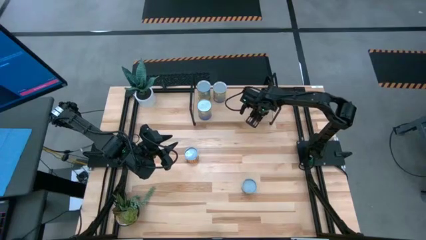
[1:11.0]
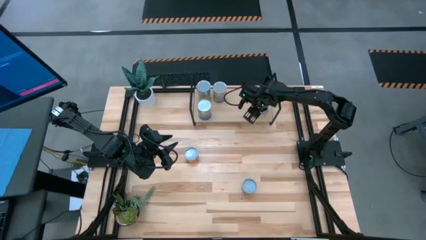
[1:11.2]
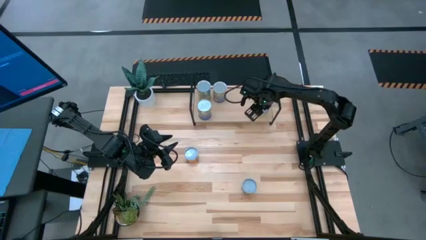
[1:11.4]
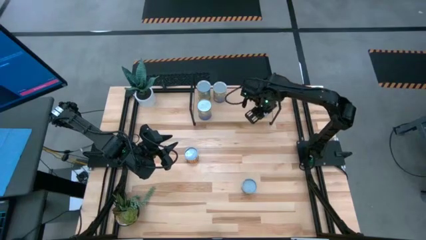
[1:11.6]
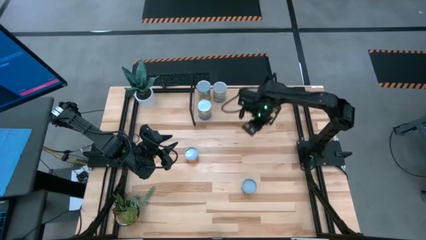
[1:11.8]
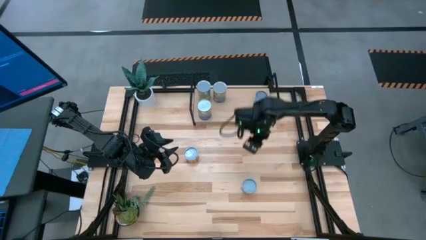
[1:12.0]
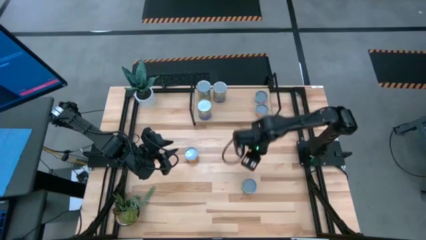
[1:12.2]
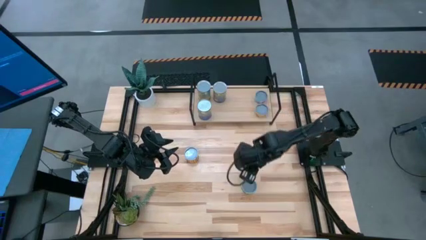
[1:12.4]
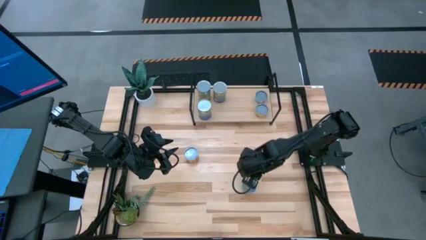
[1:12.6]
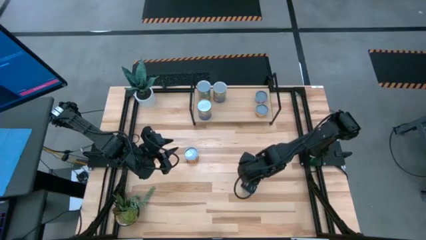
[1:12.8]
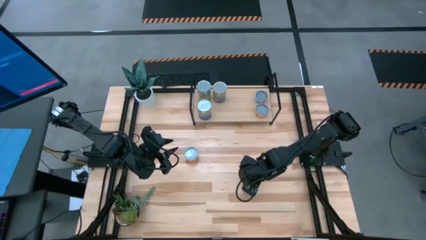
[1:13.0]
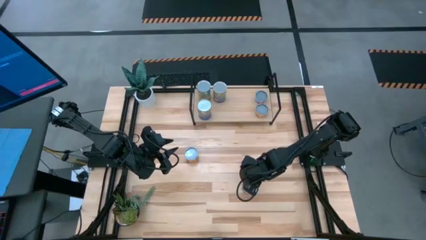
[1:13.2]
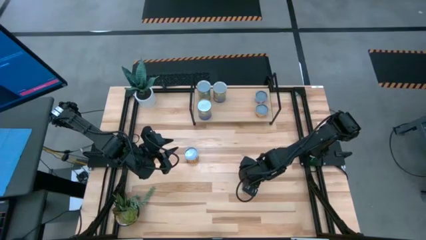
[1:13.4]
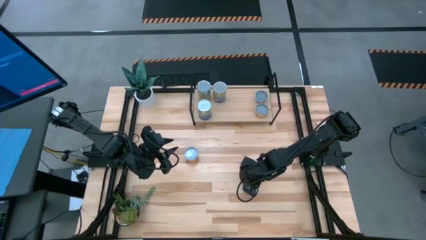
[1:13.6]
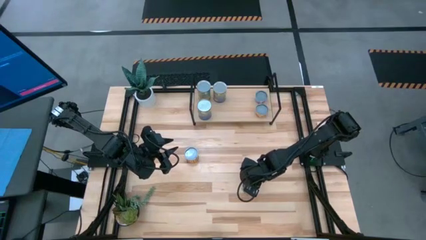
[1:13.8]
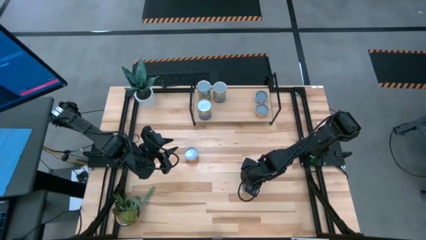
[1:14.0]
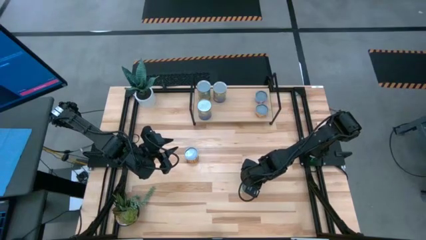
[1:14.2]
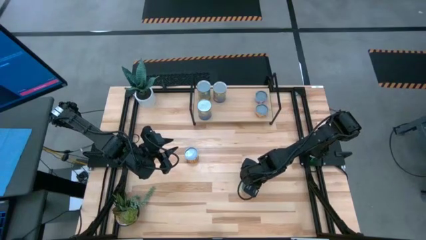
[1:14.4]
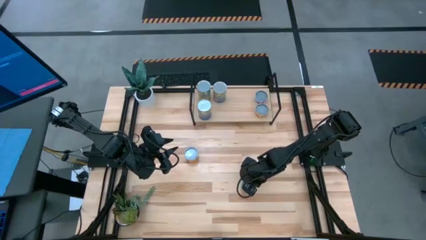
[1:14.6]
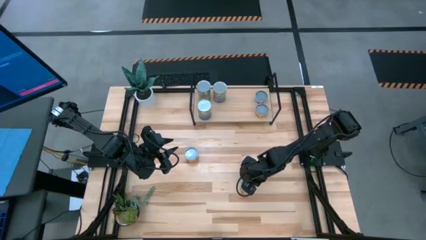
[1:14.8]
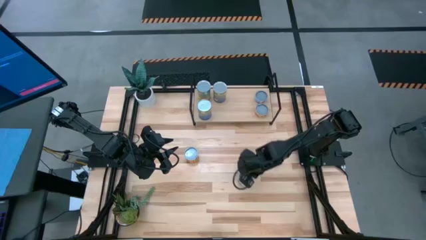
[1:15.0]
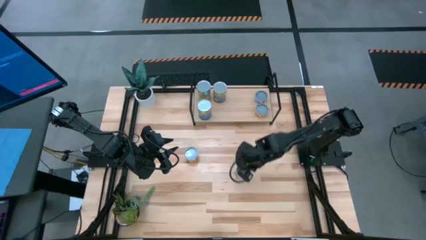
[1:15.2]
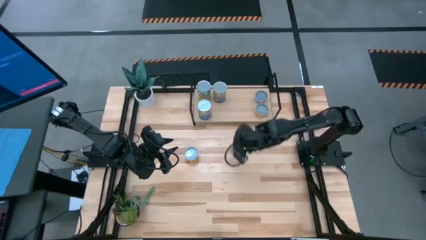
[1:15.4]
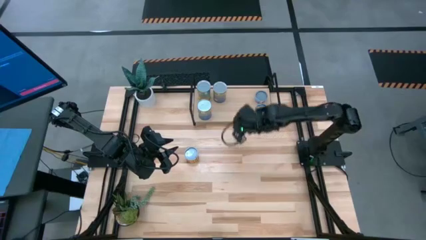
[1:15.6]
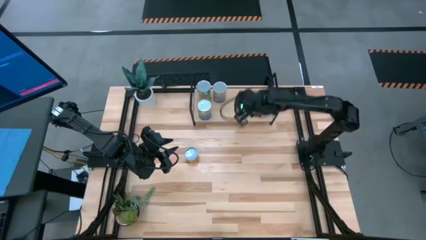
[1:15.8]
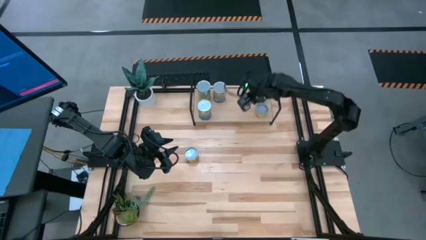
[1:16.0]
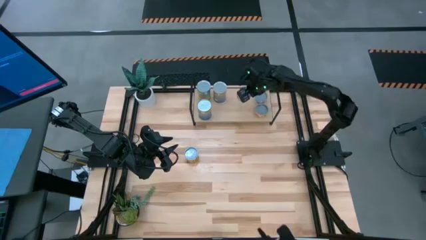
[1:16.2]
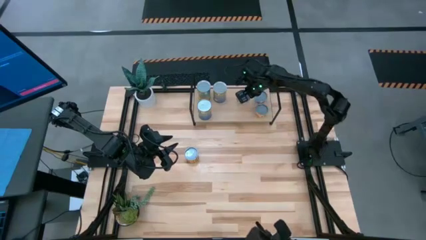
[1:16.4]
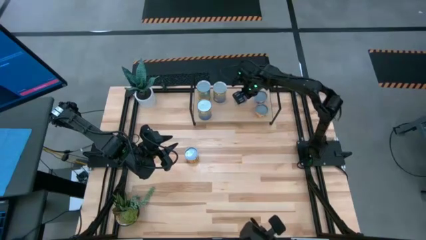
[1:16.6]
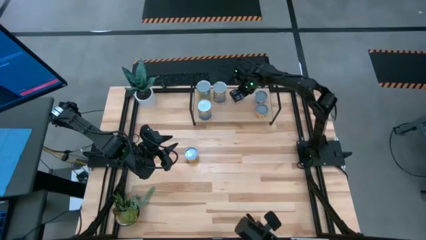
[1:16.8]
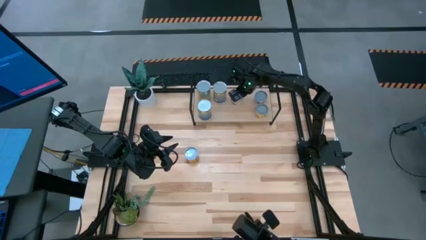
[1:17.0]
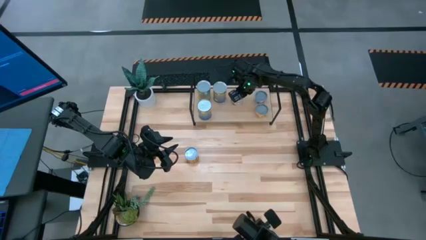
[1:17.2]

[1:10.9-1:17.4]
Task: Pick and place cans onto a shelf
Put the canned green peas on the shelf

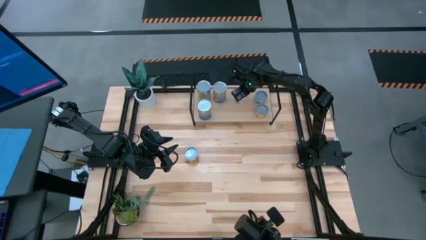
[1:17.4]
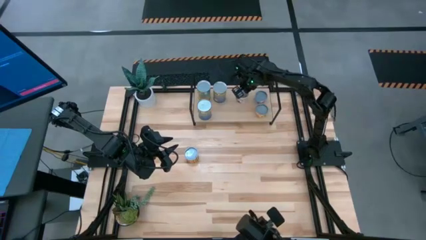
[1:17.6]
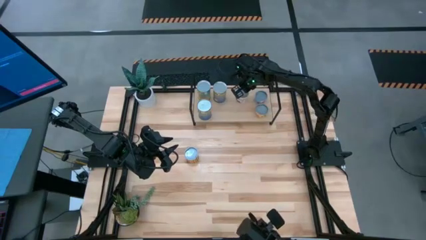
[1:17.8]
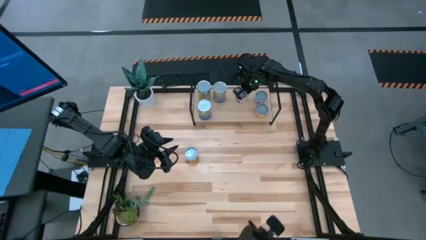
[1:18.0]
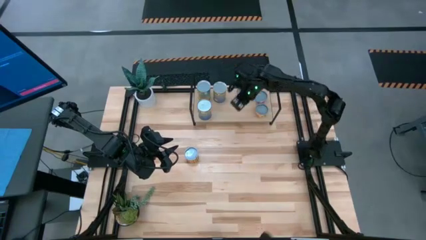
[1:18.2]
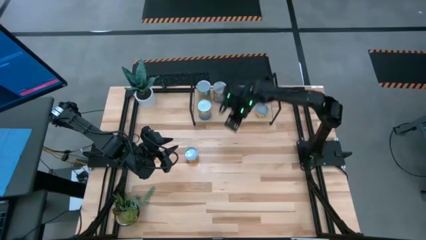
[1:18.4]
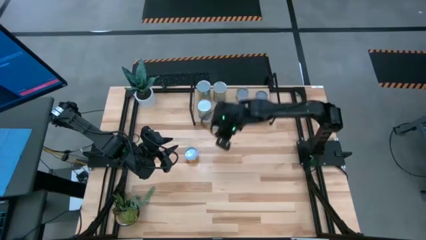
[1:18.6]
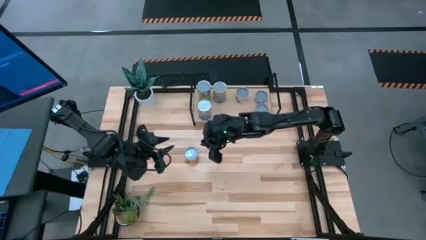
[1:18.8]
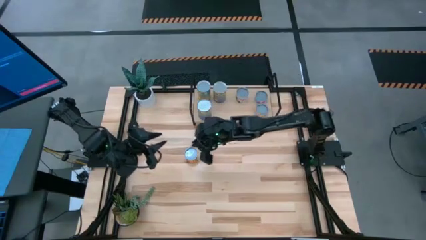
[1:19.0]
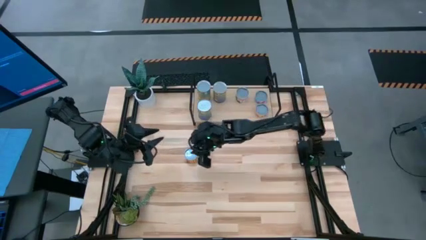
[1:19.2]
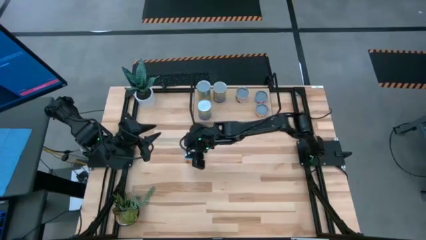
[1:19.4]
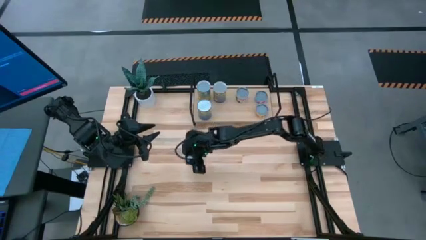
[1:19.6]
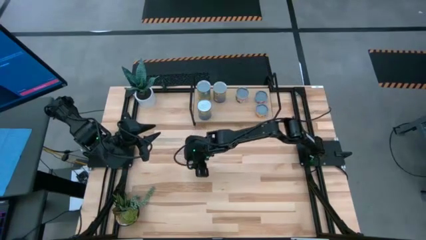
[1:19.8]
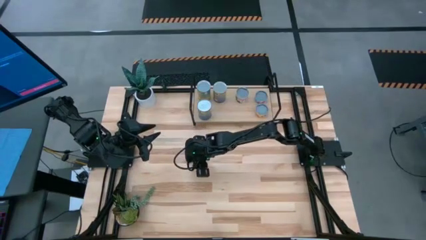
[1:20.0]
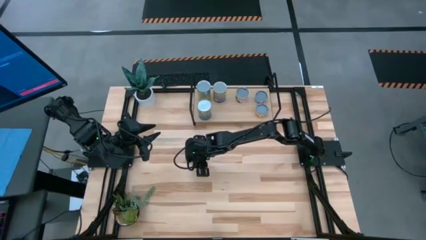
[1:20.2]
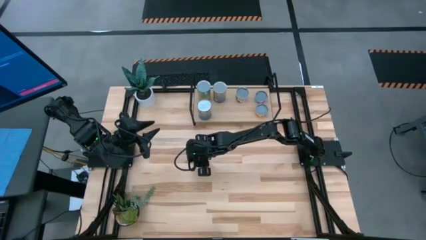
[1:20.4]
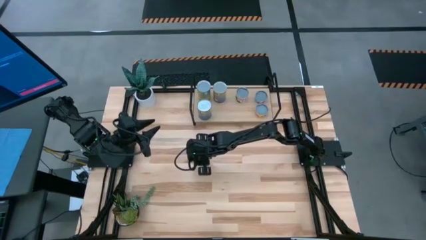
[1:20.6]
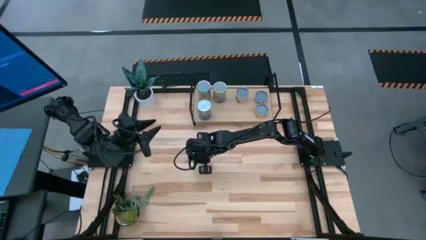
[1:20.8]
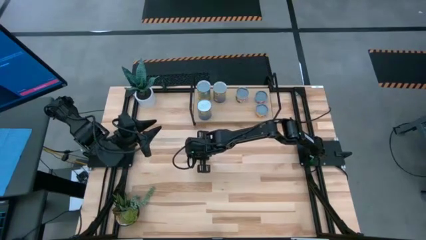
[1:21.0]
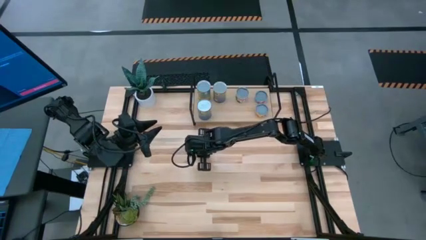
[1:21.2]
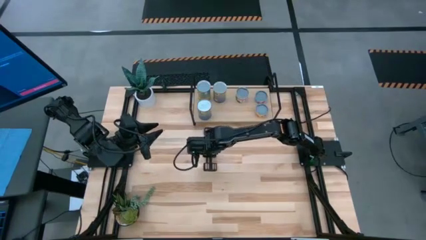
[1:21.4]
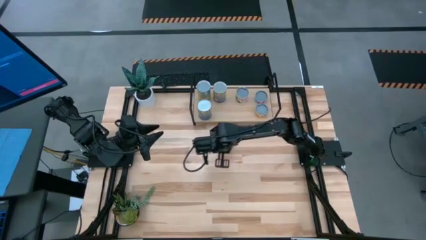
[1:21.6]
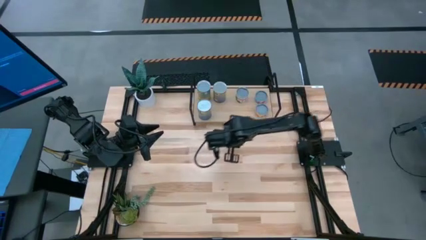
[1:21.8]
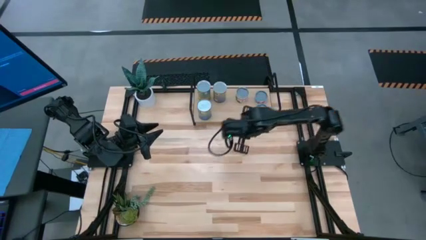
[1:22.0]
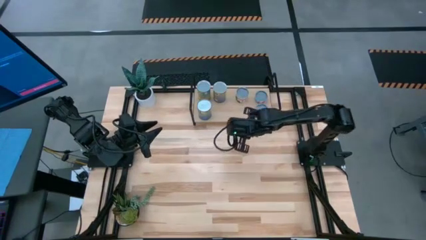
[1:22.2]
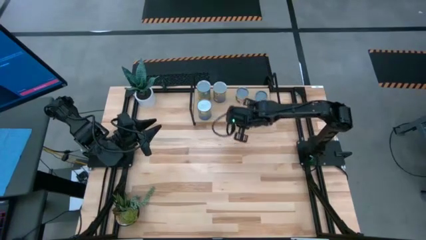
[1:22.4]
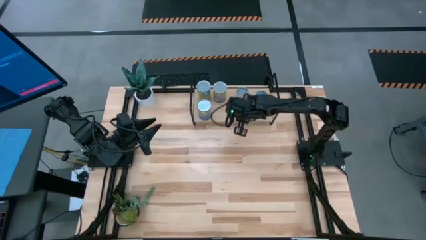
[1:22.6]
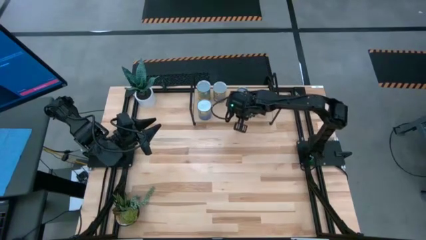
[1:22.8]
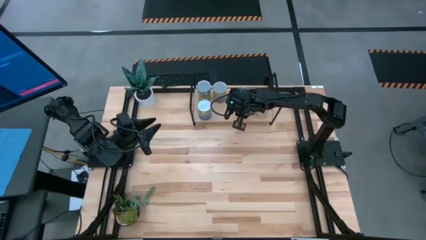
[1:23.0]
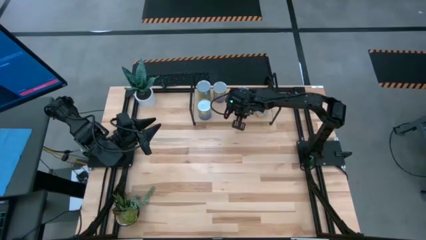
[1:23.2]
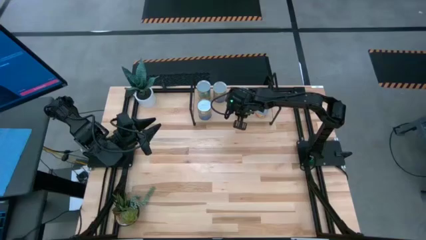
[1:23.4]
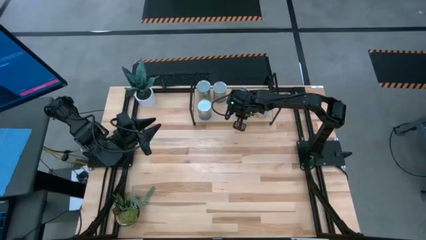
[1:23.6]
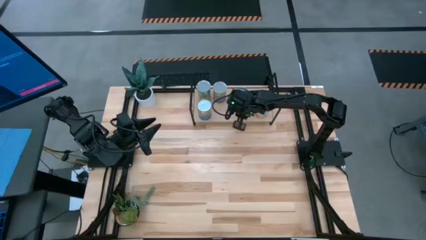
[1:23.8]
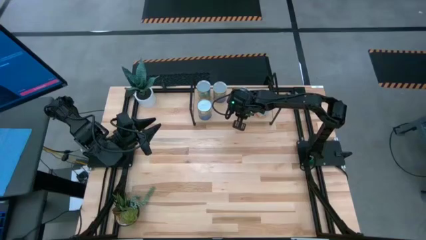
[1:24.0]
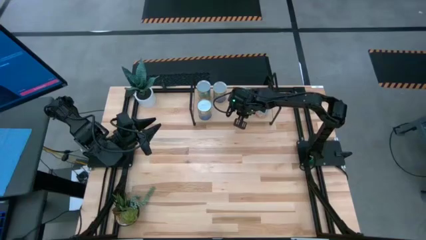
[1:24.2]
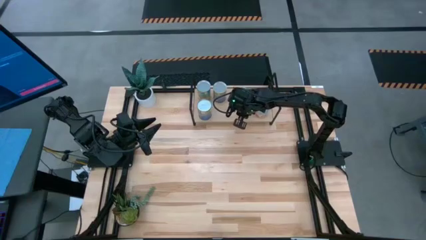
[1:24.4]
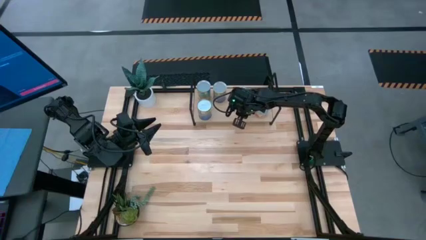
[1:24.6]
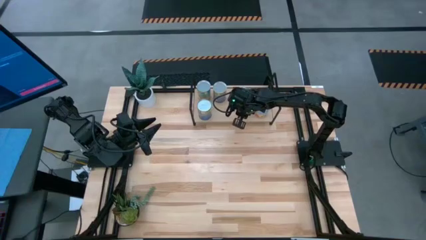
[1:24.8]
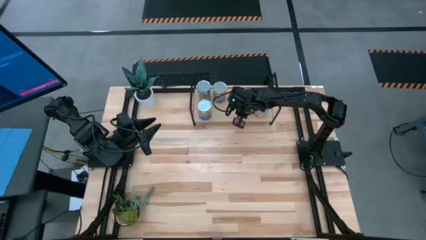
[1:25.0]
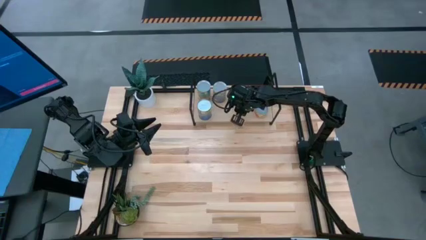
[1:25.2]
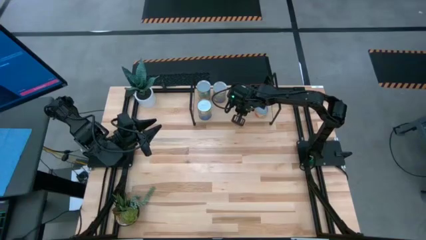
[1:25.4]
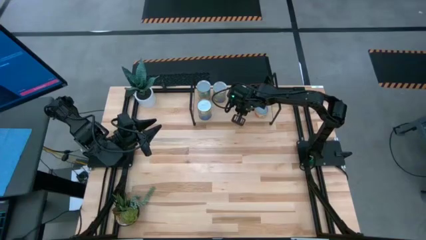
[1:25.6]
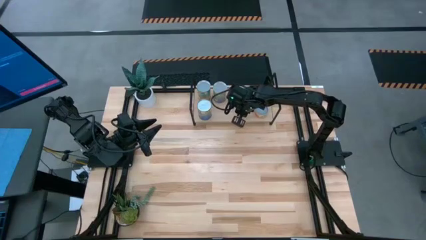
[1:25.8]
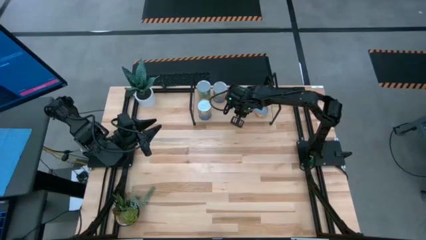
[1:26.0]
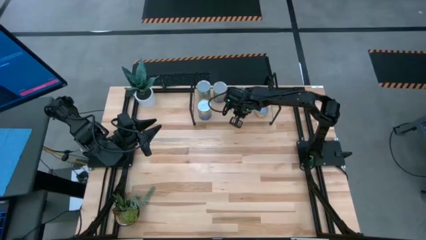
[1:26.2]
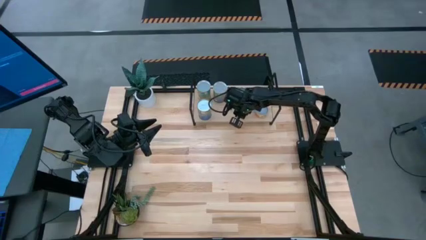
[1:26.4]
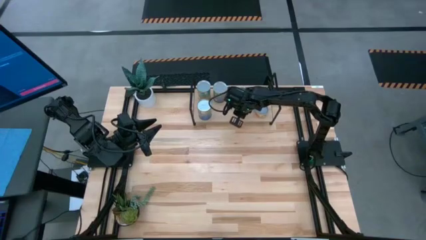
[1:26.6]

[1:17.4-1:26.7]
Put the canned black beans on the shelf

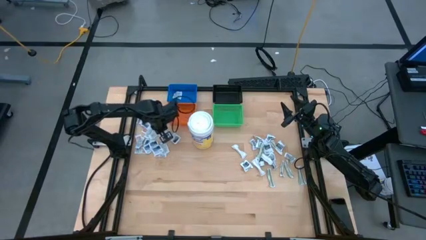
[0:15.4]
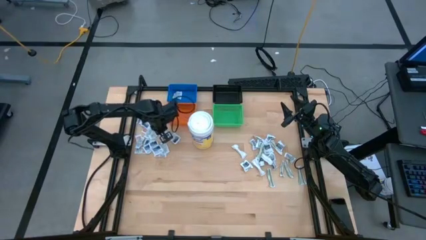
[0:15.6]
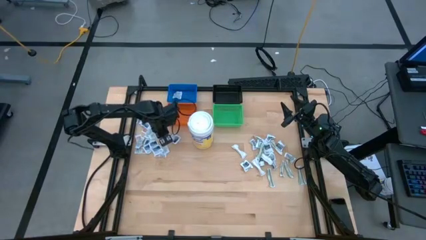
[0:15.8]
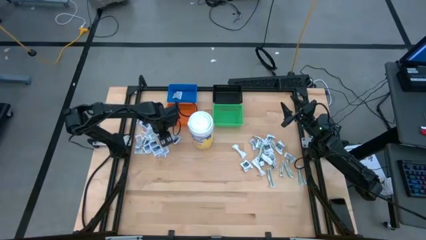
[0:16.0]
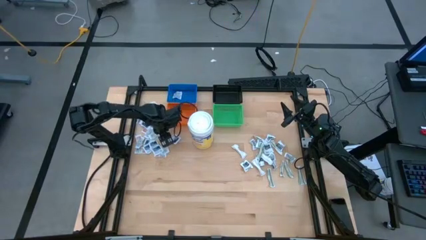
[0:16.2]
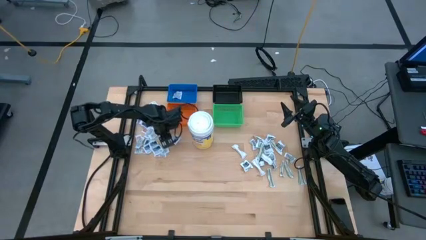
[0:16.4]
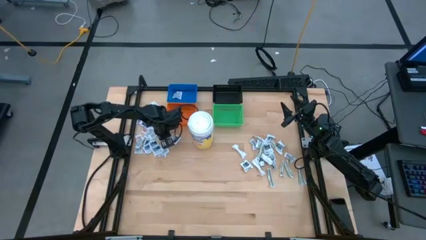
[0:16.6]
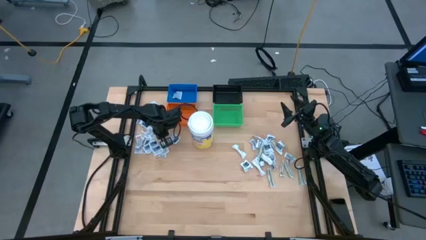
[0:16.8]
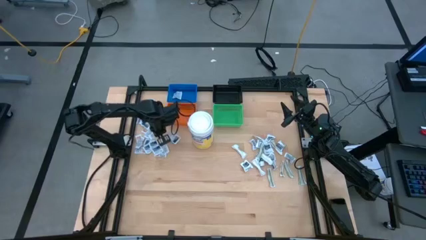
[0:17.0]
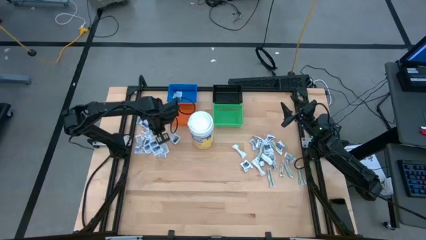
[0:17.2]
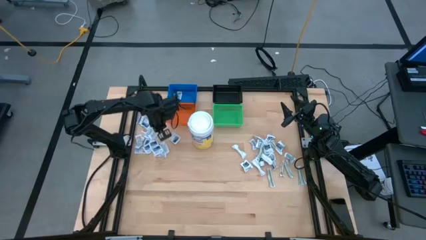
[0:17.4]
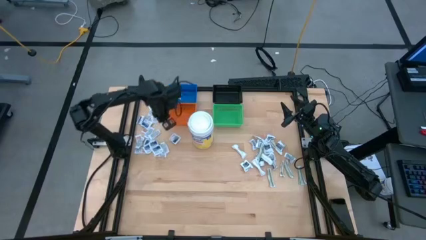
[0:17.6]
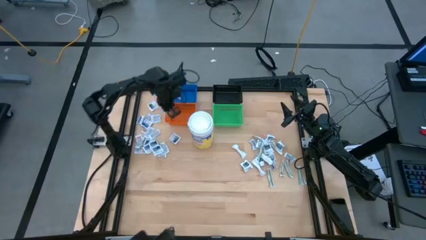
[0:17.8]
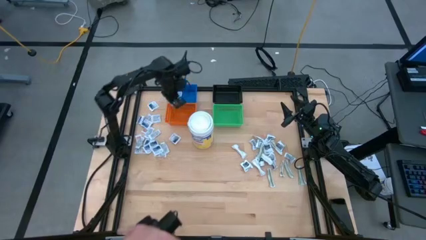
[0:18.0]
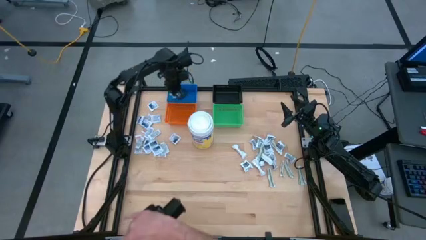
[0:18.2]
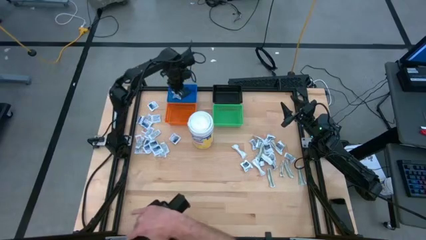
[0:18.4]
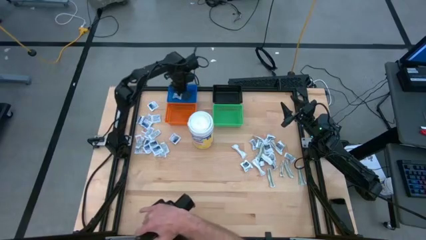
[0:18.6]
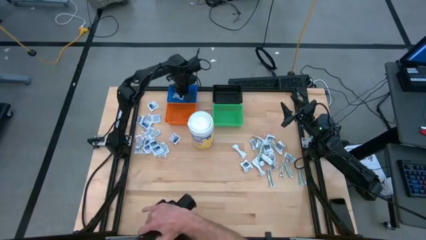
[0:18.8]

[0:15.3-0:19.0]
Task: Pick & Place First Aid Supplies
Put the blue alcohol pad into the blue bin
